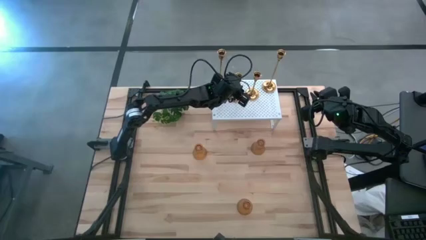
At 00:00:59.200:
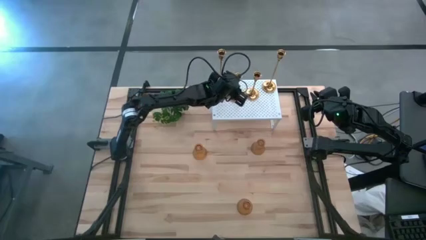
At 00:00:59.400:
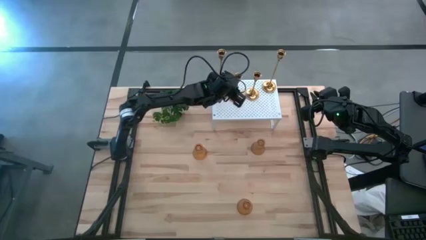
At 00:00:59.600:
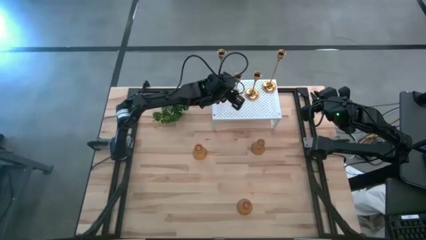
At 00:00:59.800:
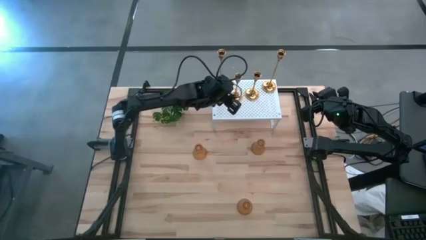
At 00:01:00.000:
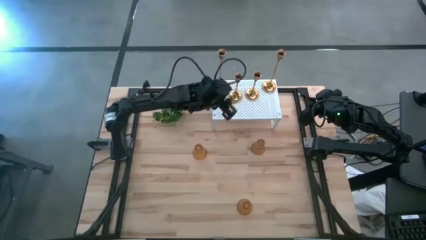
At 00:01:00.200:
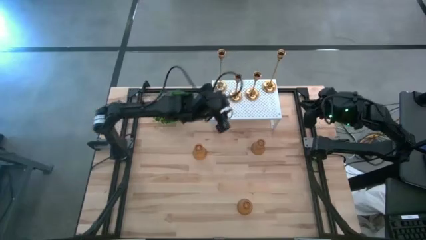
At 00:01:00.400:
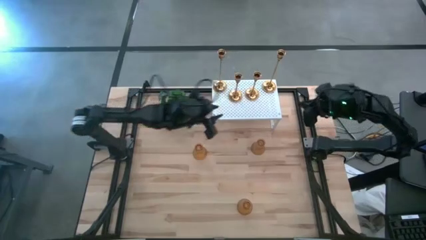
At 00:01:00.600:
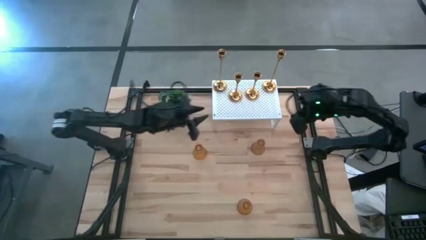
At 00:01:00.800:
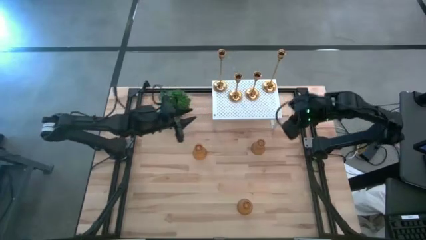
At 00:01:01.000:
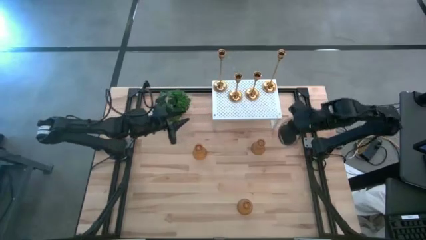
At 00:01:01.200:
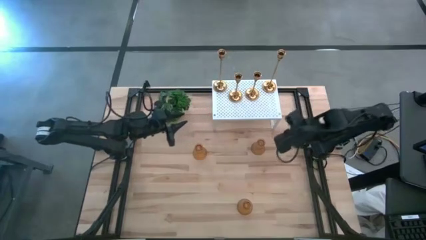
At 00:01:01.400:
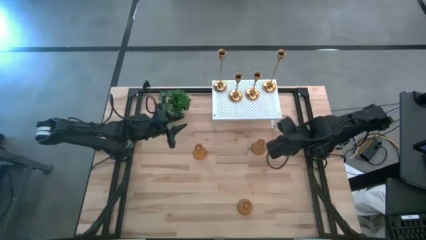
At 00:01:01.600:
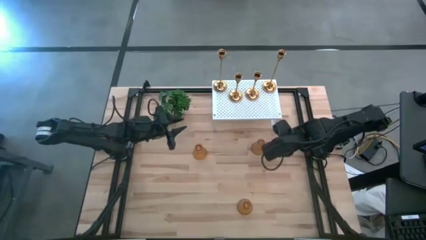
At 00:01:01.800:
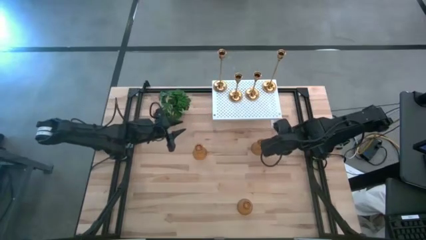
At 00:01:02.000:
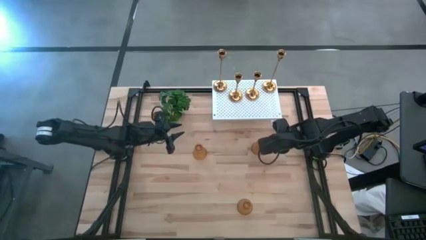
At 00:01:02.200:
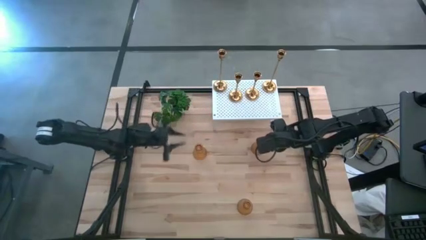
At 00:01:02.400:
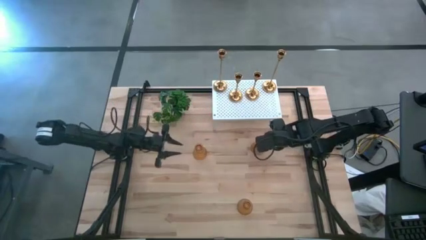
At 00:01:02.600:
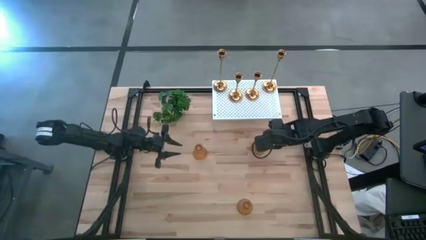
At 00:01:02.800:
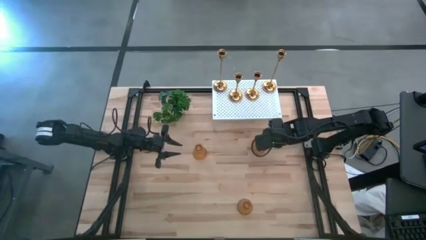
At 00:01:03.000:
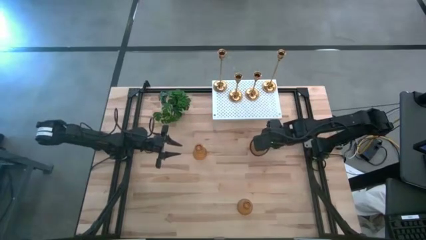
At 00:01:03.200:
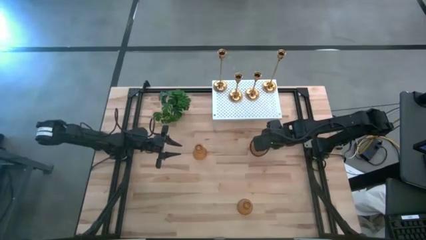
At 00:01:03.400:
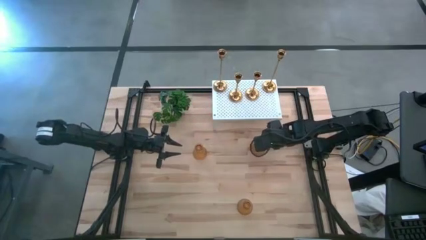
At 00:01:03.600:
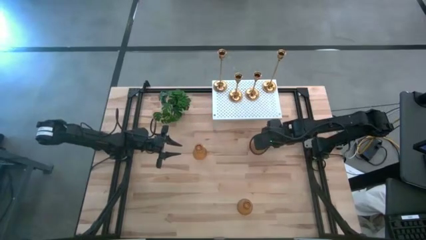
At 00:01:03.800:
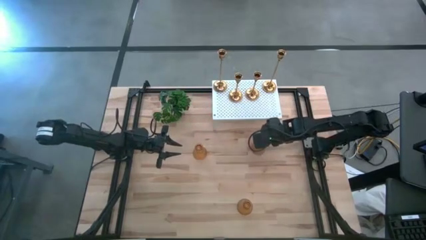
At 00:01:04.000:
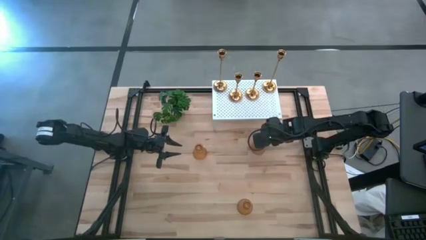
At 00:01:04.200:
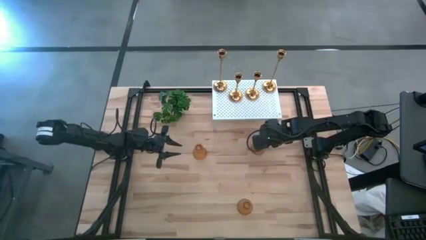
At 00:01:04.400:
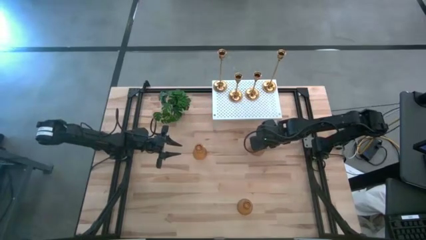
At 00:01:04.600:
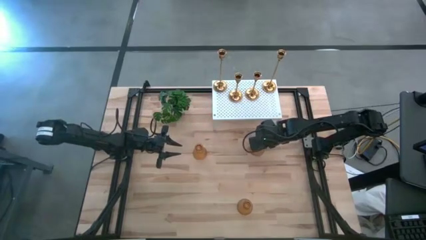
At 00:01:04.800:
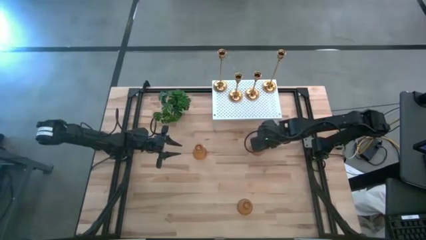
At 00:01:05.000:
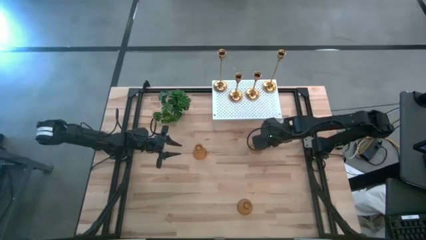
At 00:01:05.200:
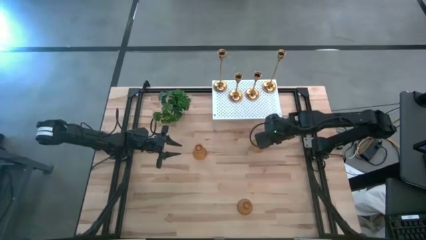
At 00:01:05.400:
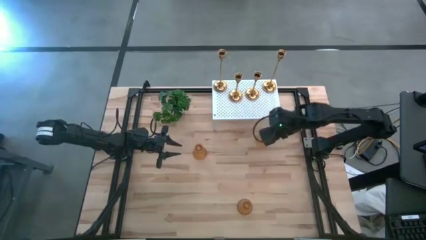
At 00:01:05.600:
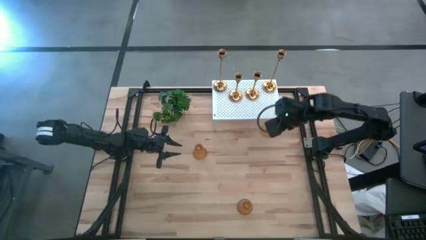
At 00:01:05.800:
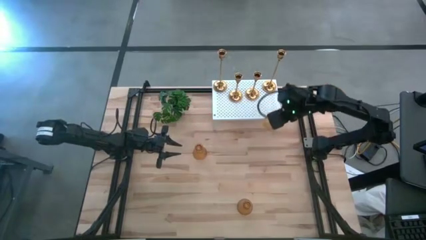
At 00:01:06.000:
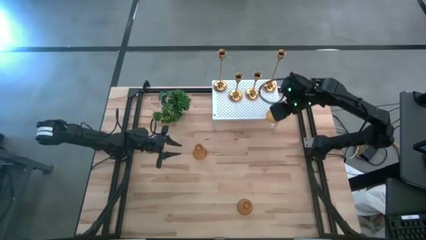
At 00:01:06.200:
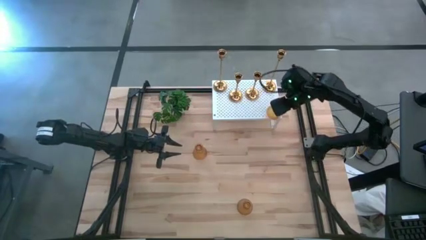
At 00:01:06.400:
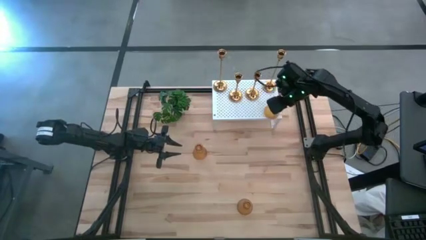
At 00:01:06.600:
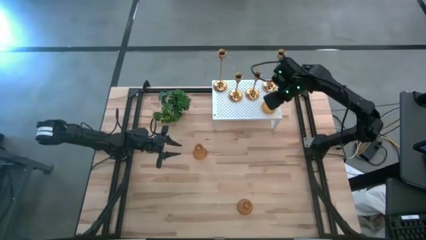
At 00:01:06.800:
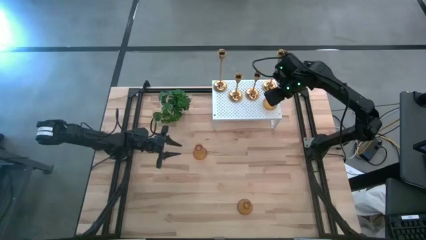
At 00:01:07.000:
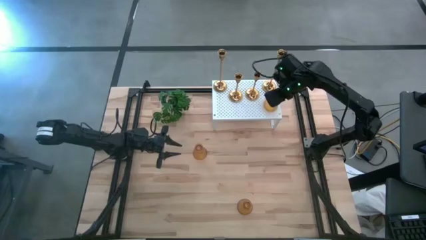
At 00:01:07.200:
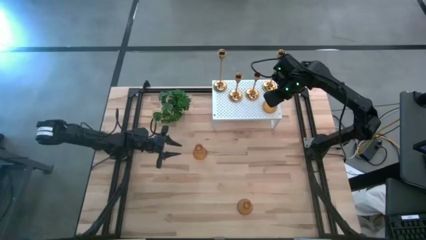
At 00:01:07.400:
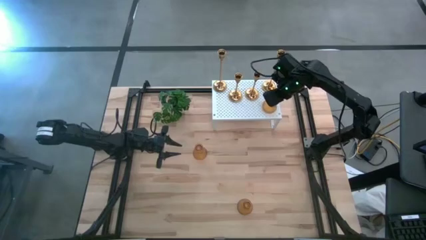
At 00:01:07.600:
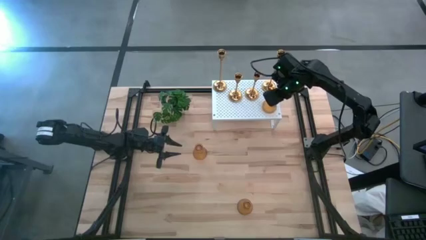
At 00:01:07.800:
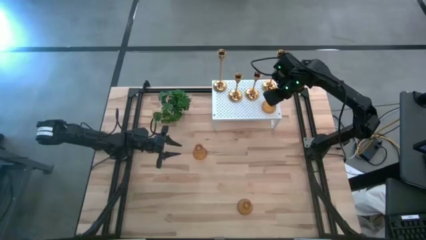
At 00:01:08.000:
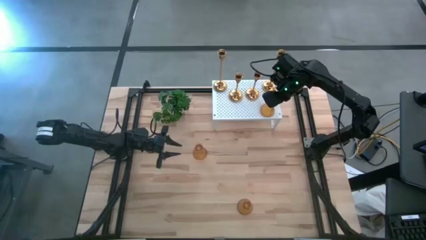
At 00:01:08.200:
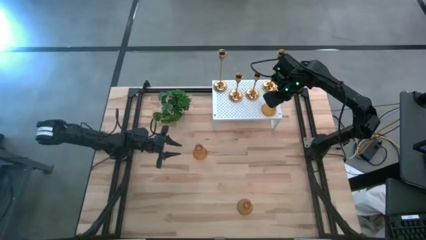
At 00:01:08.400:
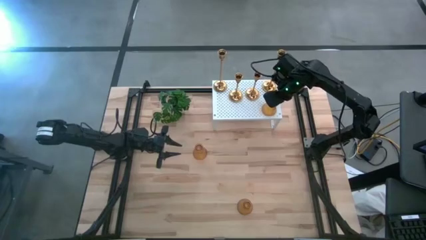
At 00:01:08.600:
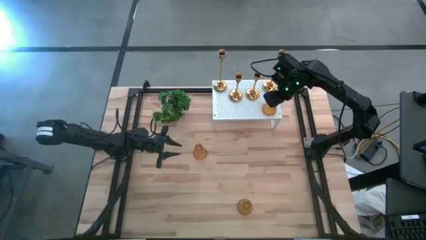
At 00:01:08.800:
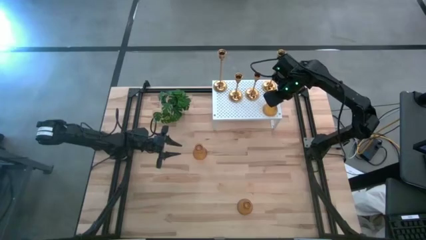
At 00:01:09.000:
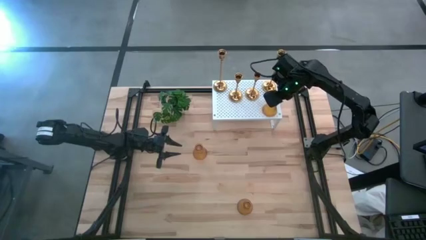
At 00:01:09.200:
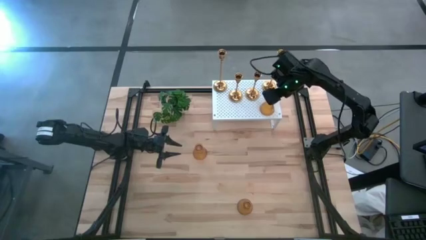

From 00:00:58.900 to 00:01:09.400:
Task: Pick & Place candle stick holders
Put the top right orange glass candle holder on the shelf

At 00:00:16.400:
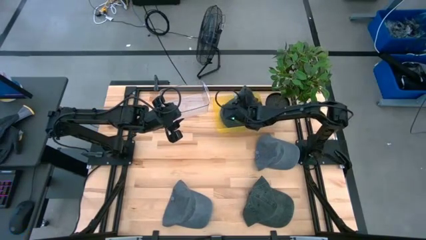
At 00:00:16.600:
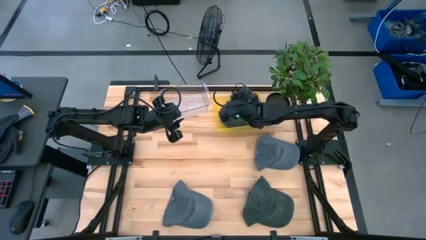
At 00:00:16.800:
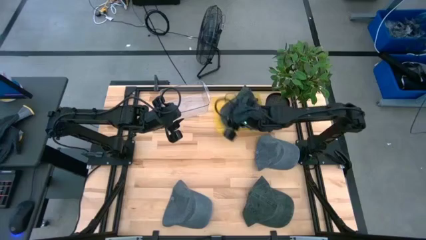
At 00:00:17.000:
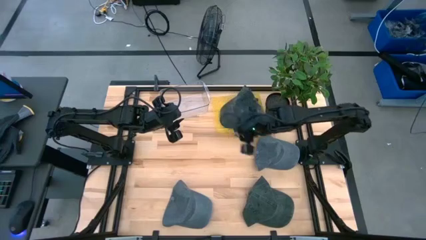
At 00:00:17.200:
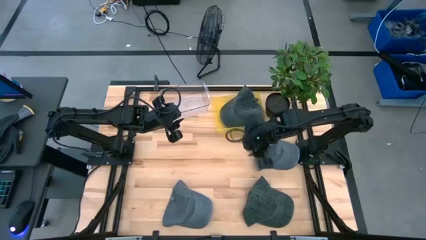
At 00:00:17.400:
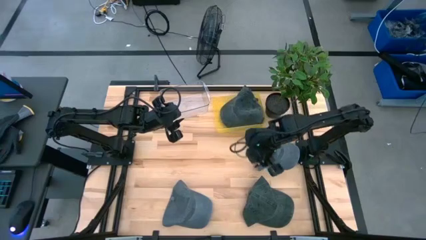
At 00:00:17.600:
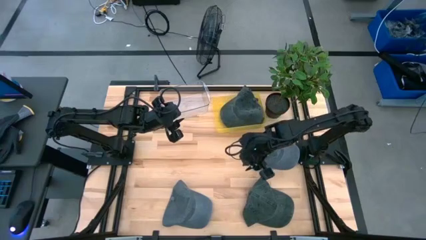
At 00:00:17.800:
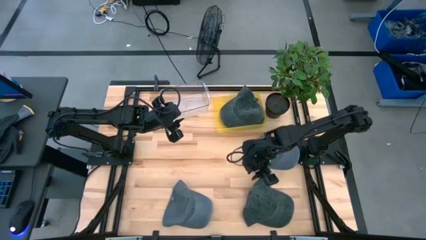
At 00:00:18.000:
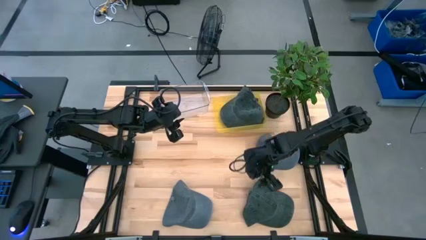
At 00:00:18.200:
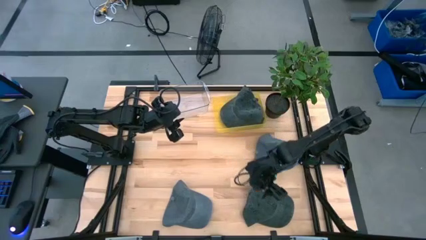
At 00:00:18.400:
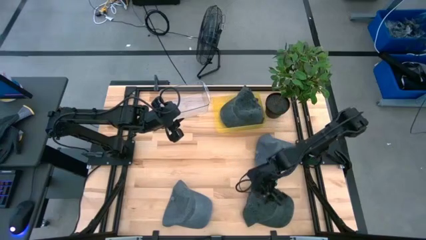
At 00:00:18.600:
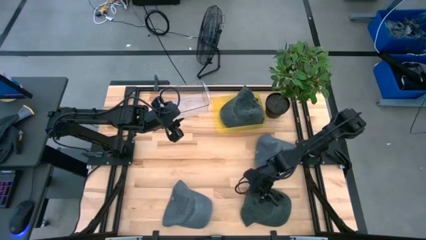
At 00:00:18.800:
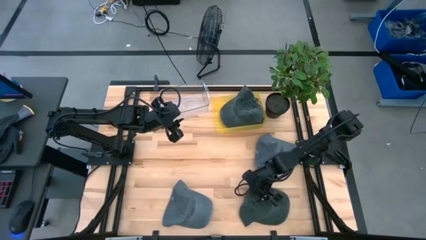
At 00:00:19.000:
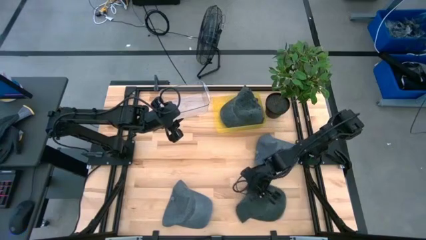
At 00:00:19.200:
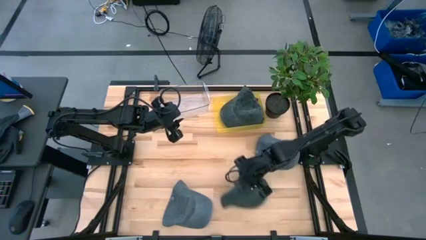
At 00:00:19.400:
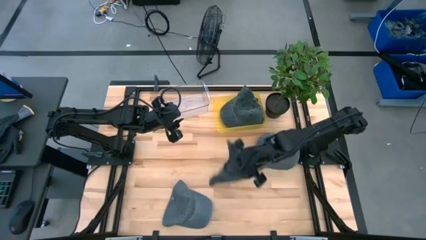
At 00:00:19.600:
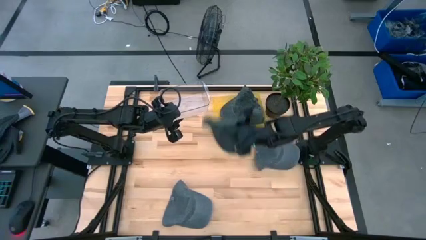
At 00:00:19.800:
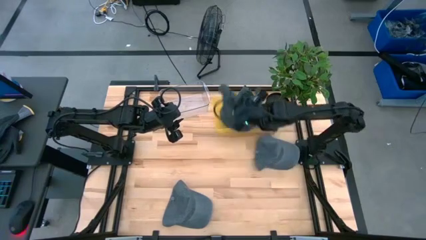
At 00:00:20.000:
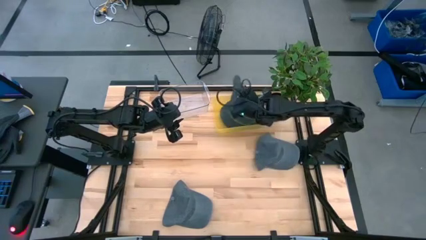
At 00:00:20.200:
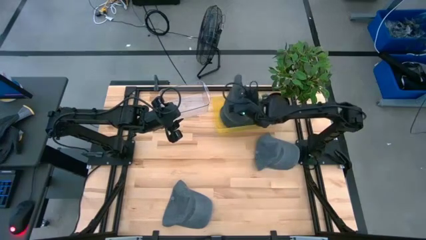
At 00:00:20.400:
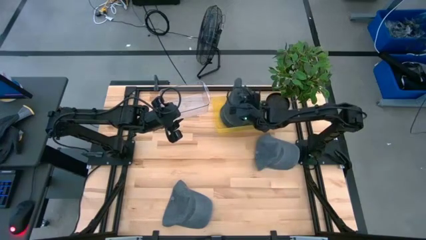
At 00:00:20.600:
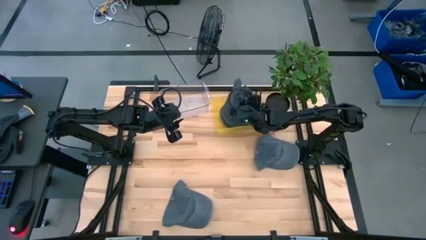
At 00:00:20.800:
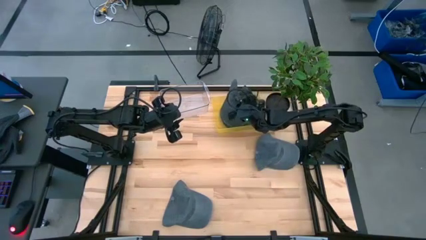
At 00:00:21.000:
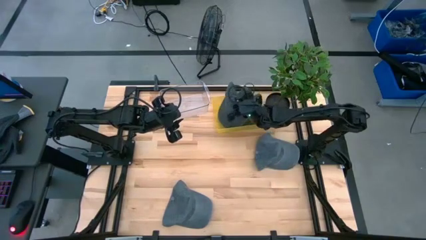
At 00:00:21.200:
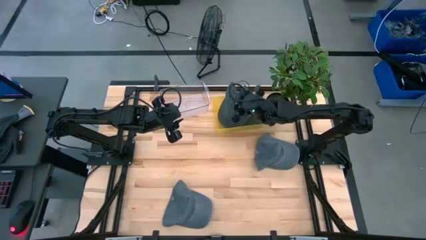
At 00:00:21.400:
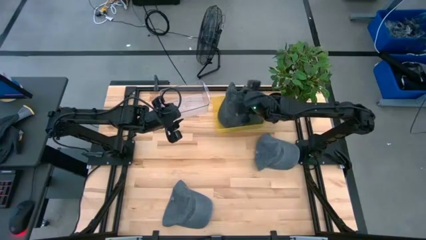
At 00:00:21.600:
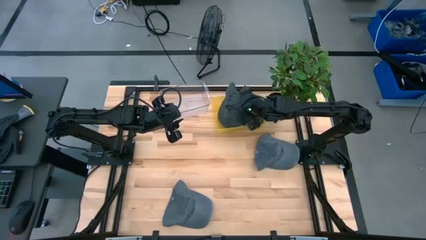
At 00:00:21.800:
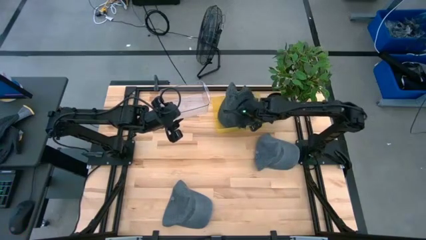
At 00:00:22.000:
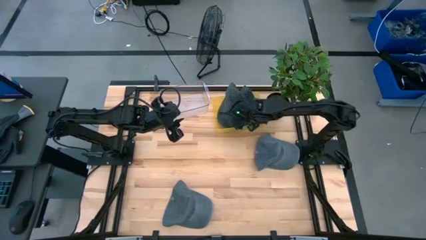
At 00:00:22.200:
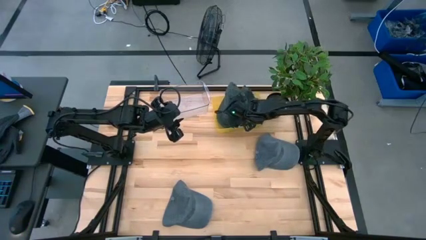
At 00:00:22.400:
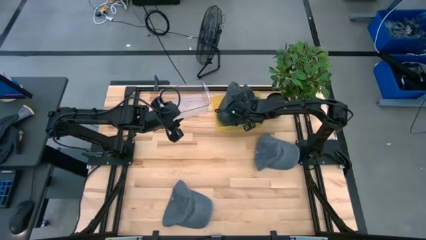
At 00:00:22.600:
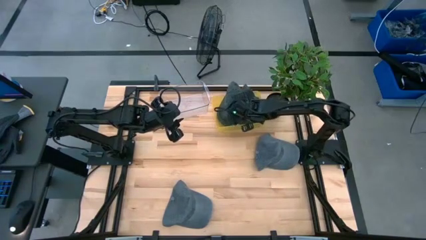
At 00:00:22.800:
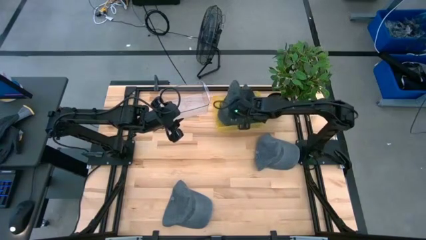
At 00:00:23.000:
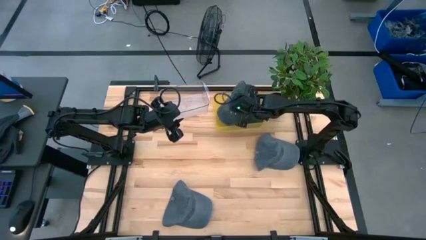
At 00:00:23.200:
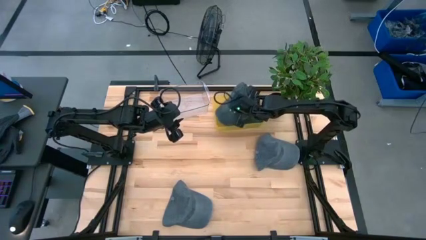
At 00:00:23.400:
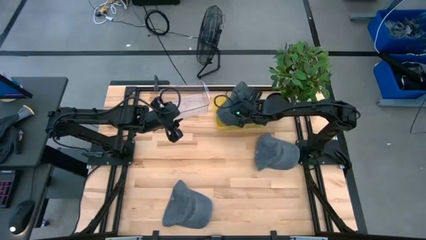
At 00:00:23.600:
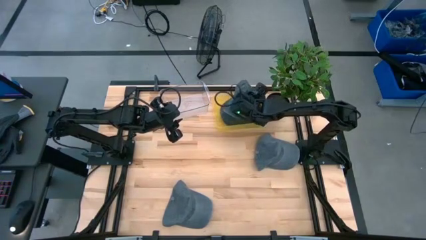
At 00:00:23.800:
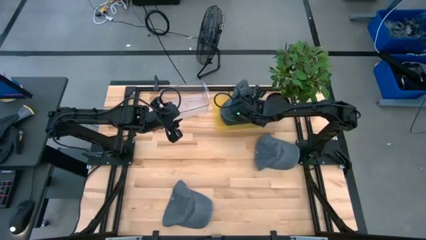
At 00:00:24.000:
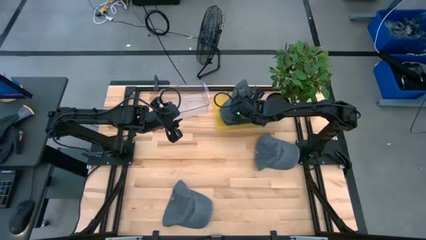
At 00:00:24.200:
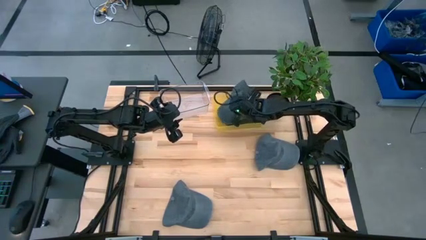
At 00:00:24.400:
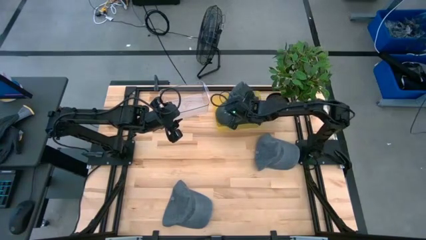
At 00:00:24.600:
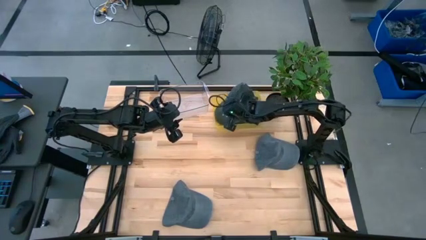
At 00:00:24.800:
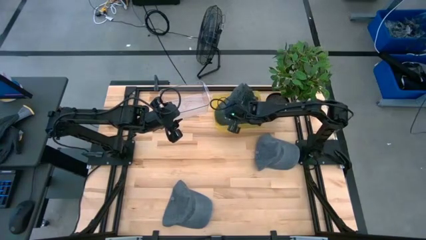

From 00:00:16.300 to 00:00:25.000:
Task: Pick & Place hat
Put the black cap into the yellow bin
